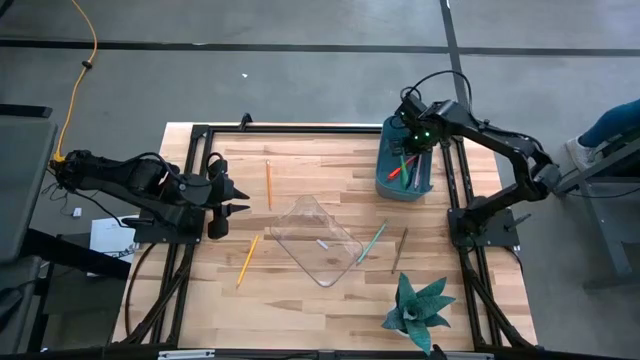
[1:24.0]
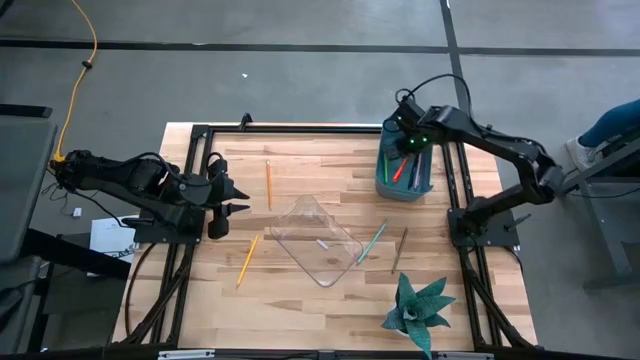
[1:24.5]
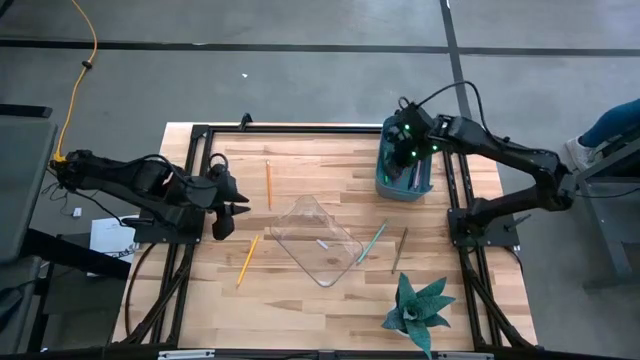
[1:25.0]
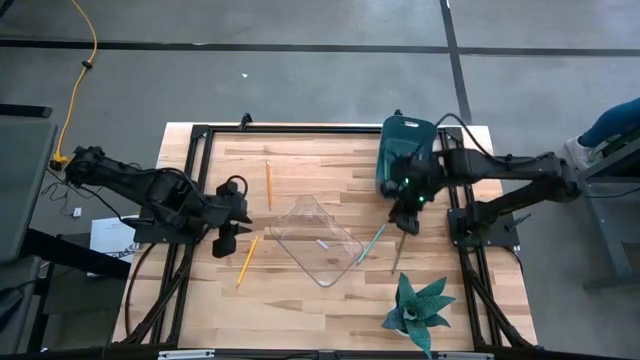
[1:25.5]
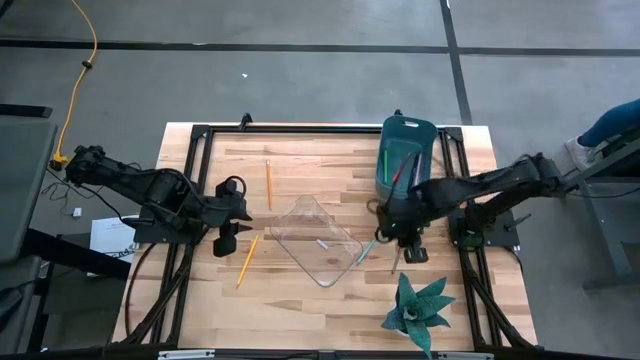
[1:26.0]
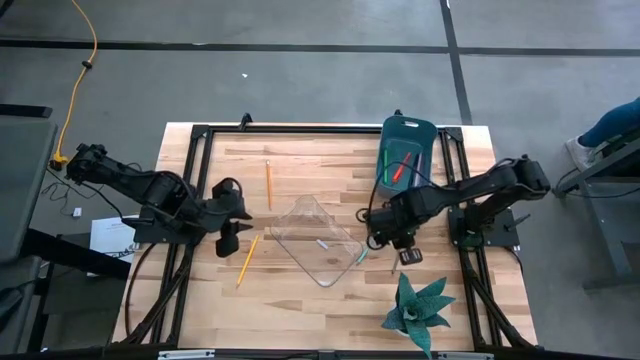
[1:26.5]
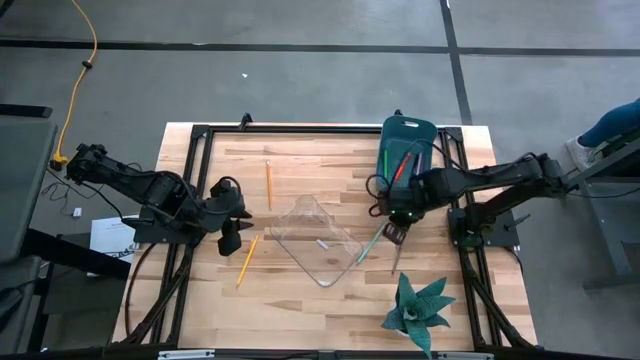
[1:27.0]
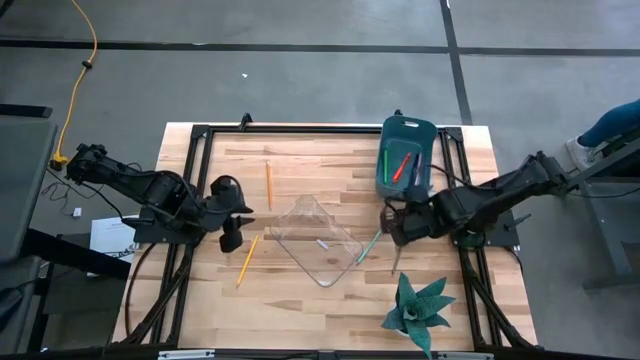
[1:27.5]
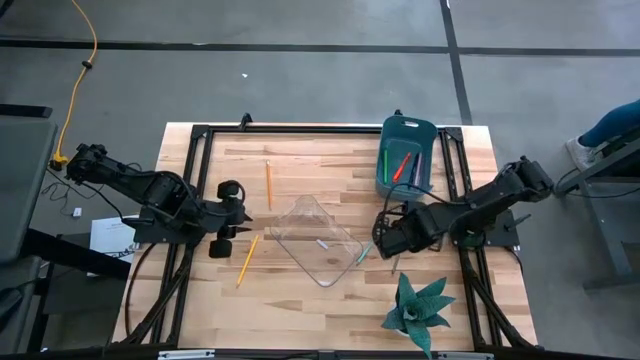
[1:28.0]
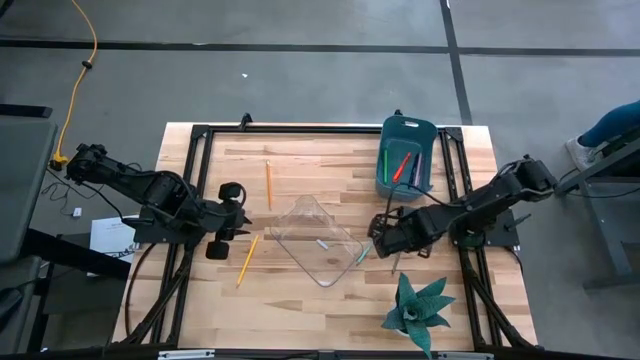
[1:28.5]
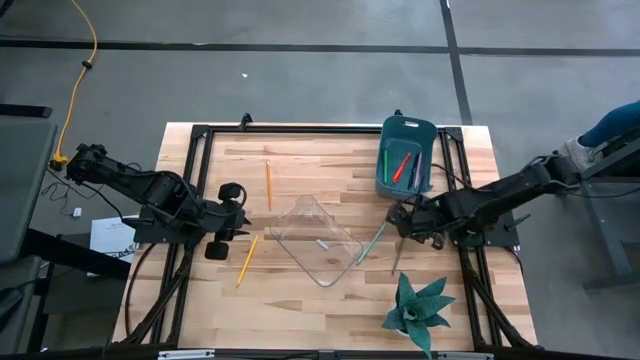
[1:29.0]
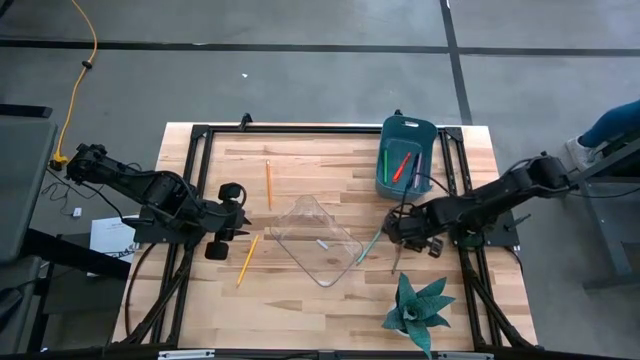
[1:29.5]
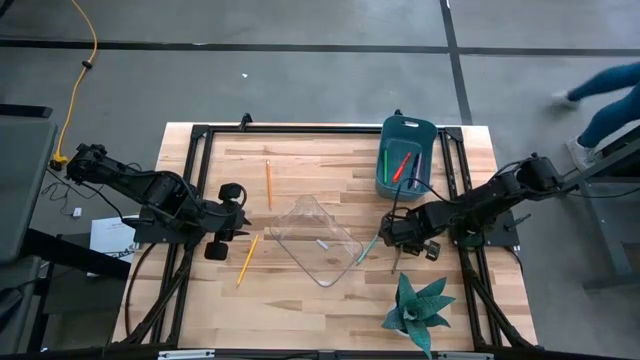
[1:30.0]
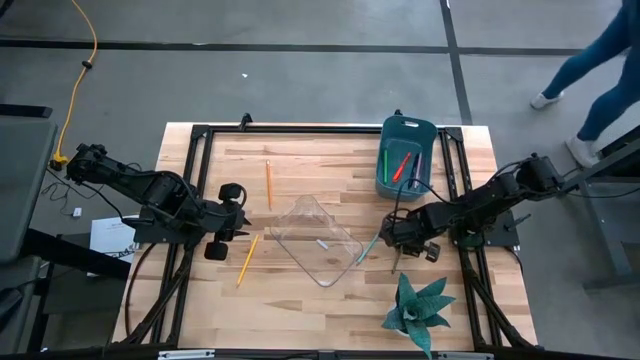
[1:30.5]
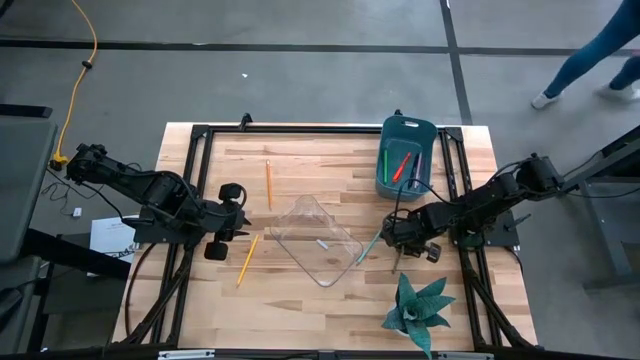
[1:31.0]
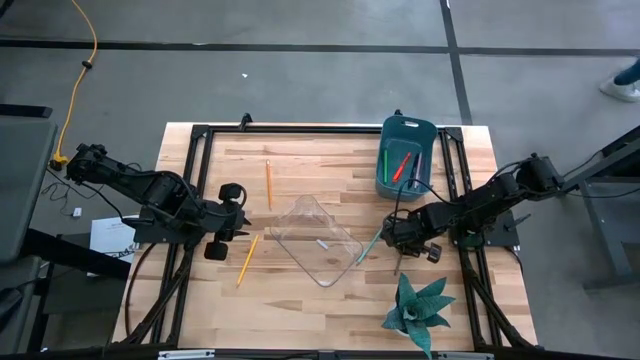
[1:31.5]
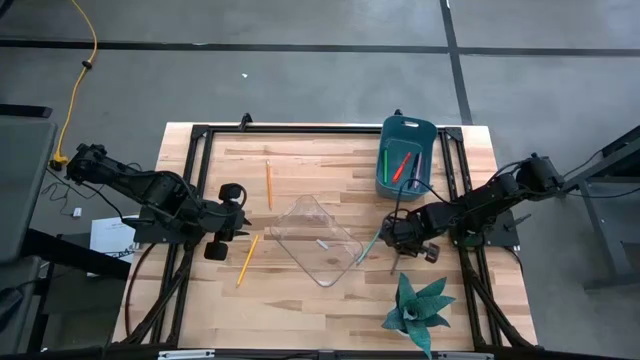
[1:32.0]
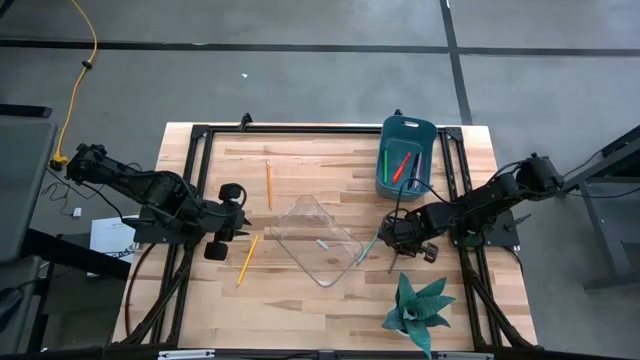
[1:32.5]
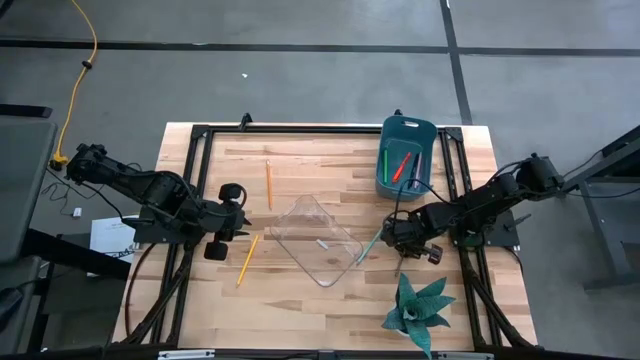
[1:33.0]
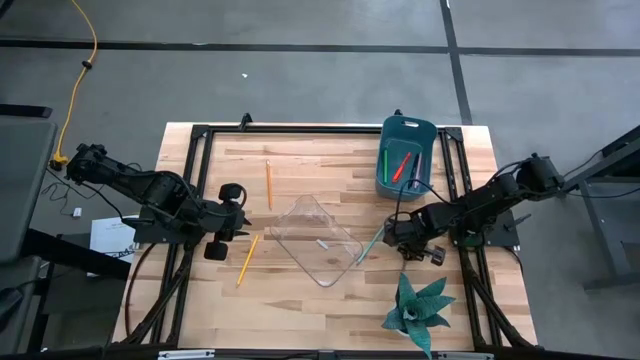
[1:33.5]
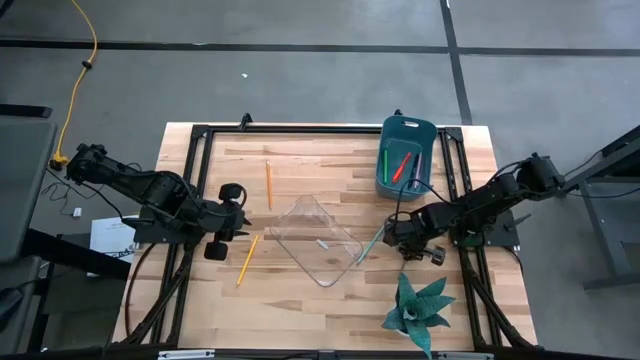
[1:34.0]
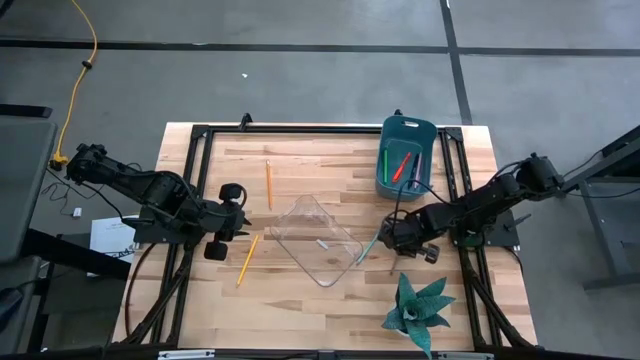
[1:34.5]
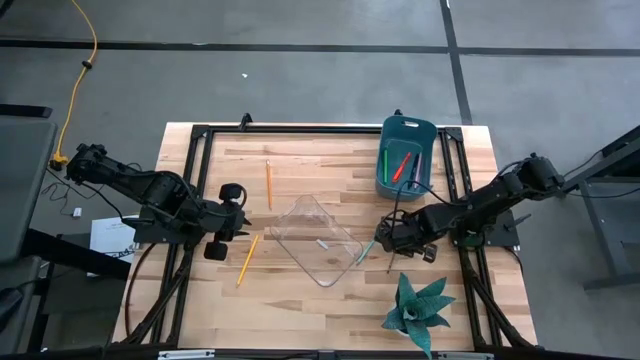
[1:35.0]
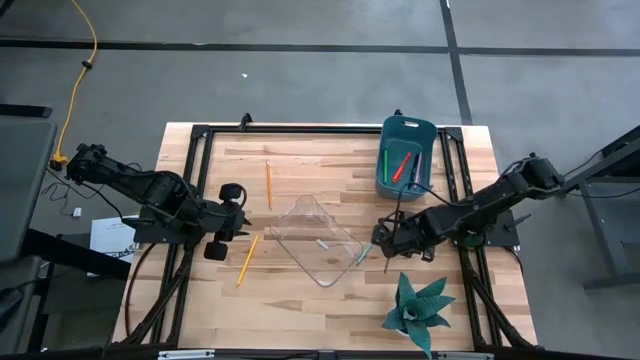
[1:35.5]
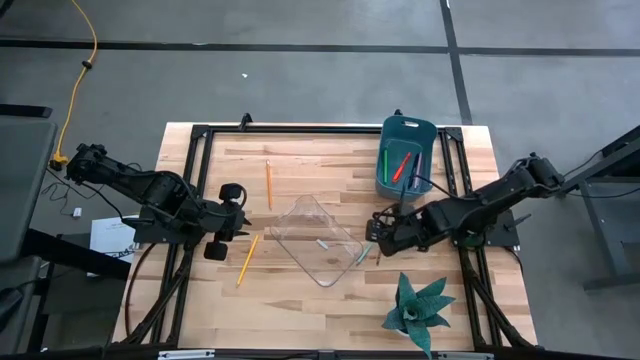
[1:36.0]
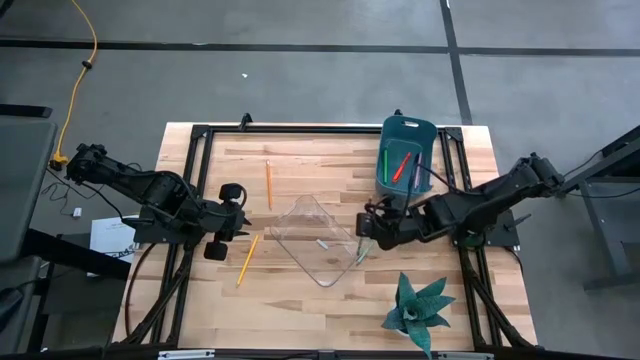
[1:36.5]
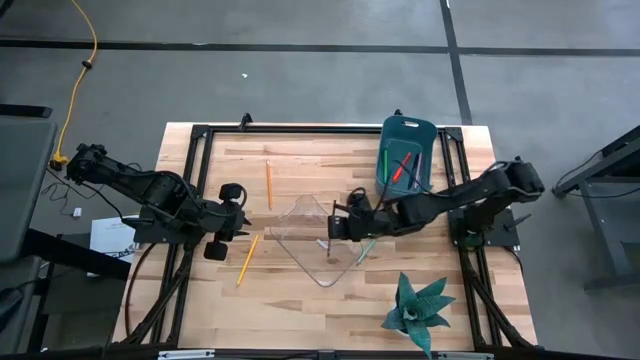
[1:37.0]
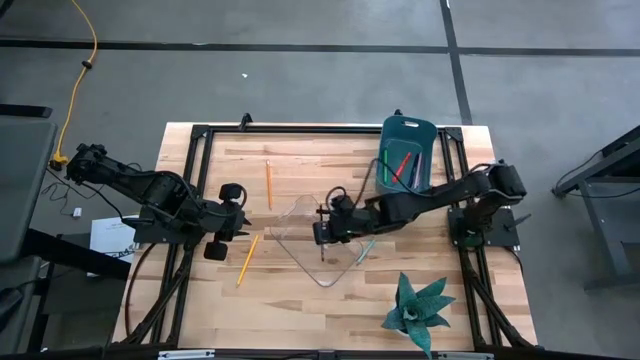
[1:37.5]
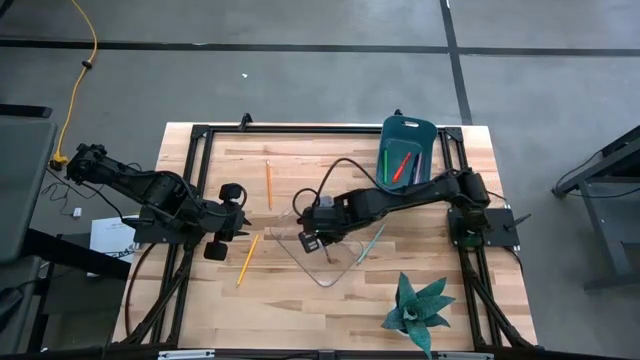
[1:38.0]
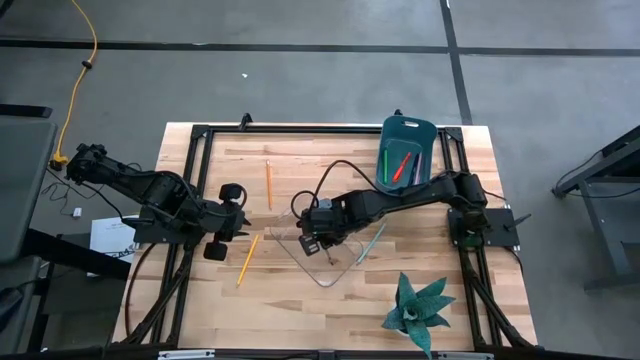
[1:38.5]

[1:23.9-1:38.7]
Task: Sort pens & pencils
Put the black pencil into the transparent bin

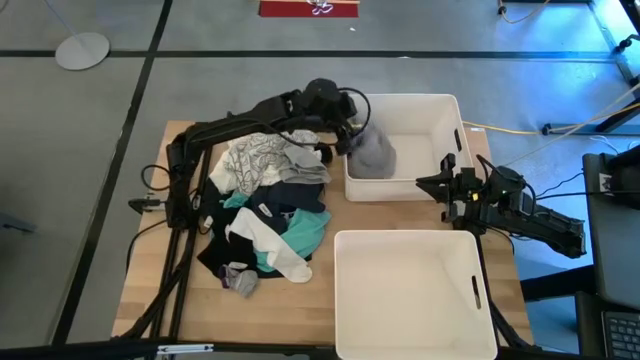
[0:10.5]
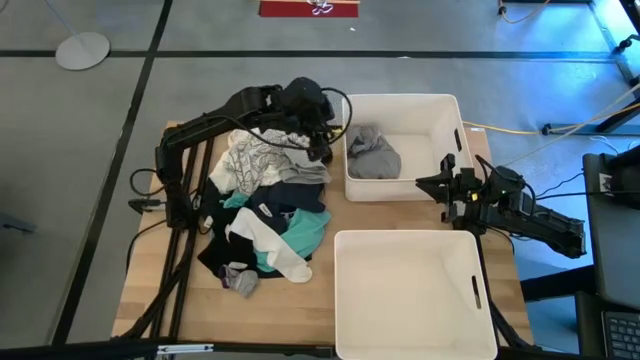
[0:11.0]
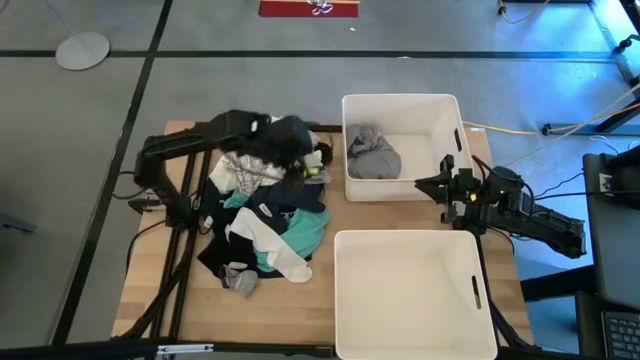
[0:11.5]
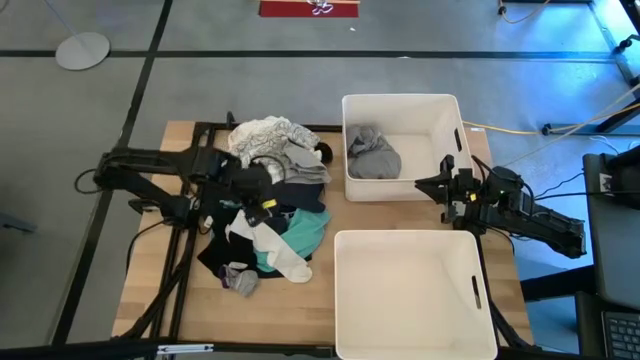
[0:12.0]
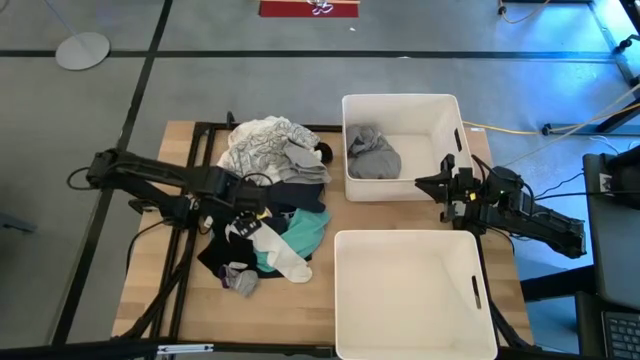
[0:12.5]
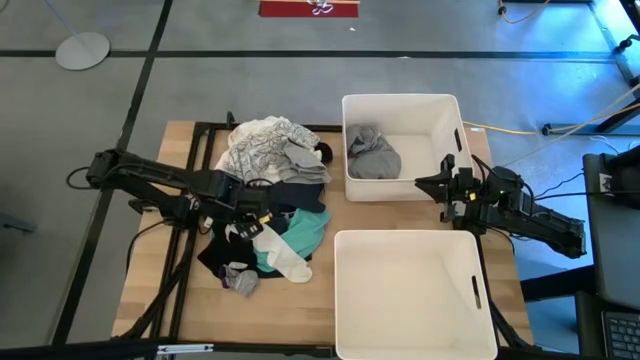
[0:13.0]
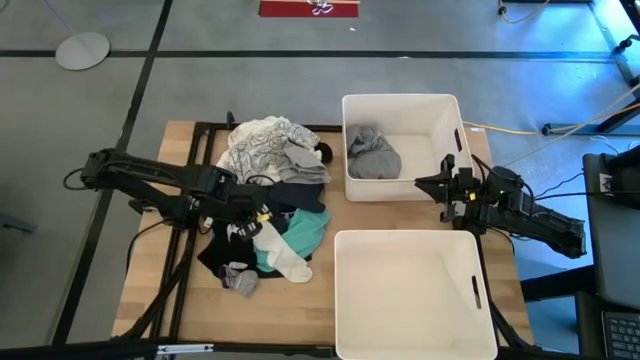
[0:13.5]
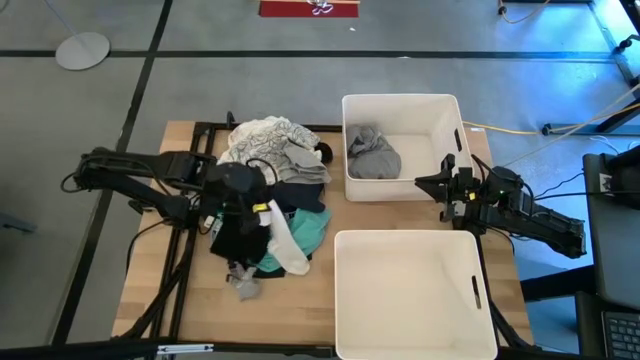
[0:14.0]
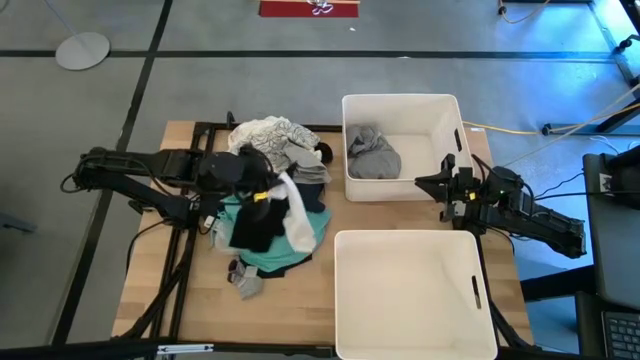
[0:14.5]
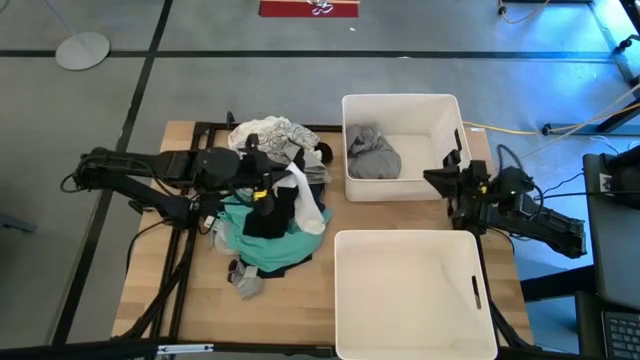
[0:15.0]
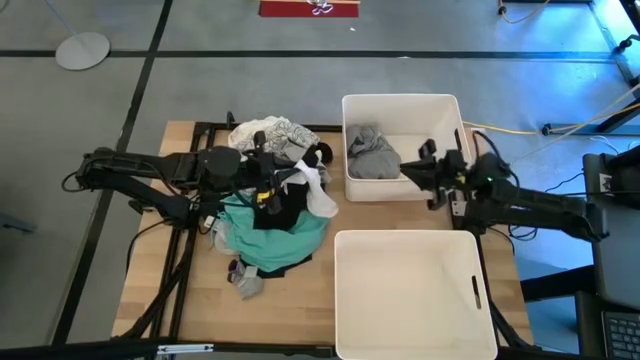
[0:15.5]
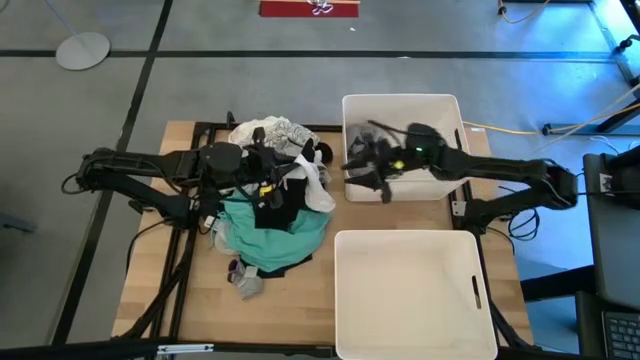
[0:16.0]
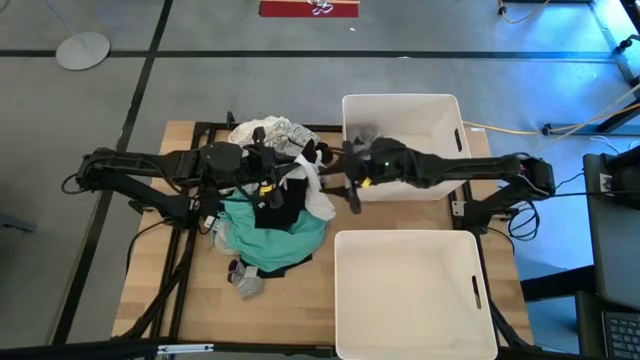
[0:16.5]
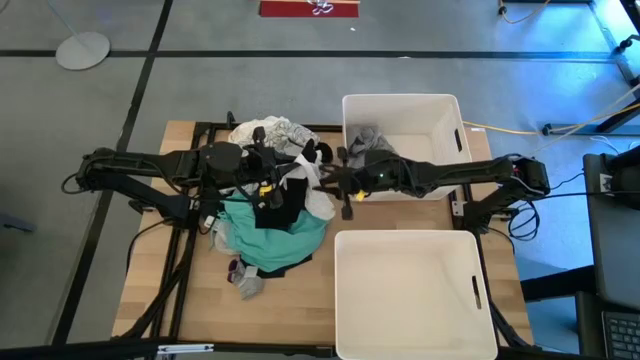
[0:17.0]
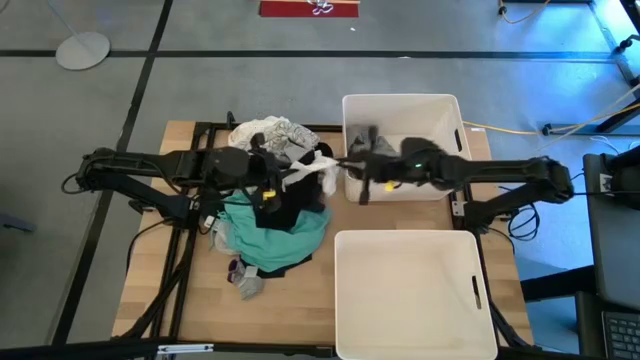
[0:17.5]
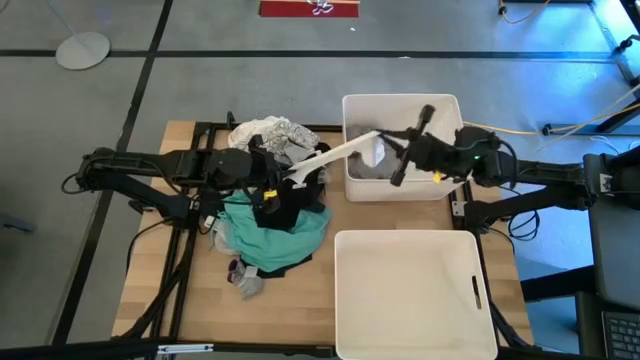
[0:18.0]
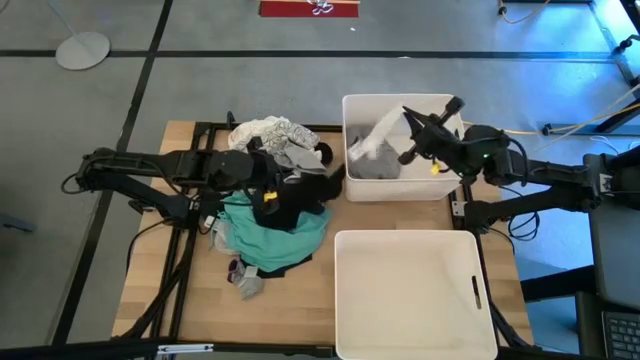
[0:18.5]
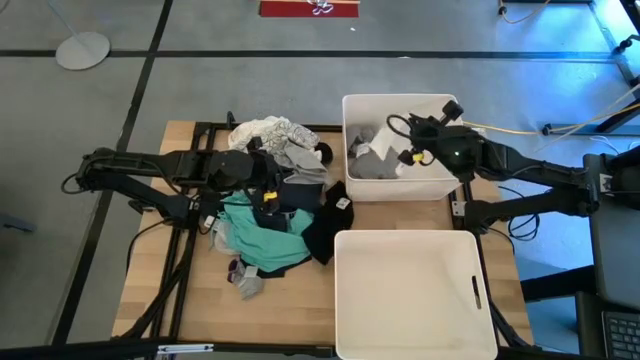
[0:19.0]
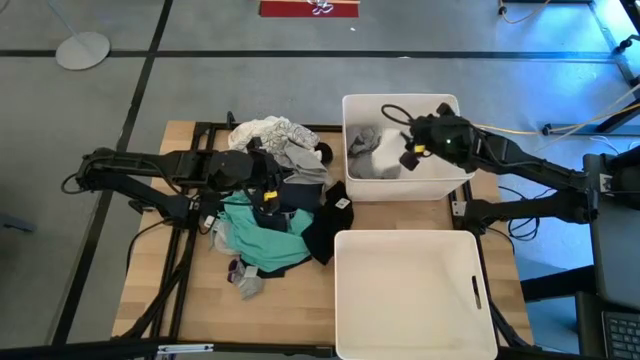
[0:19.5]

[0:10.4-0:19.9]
Task: Sort clothes
Put the white sock into the top white laundry bin
